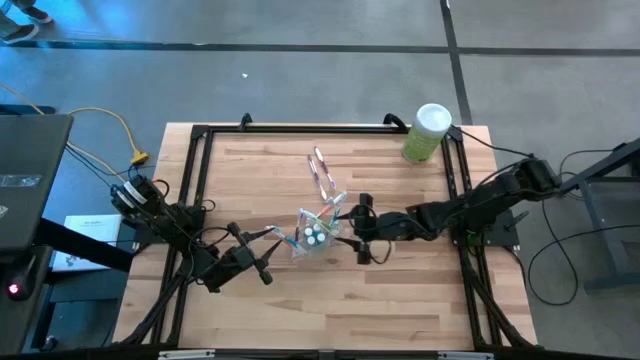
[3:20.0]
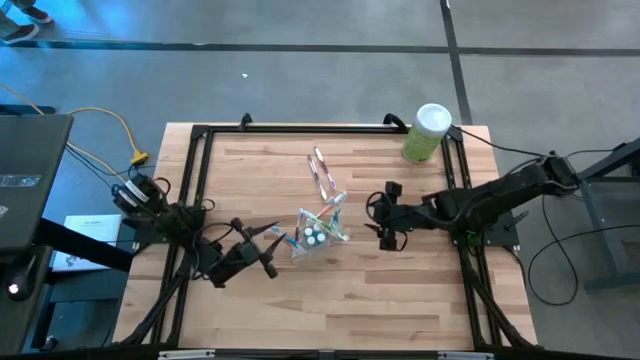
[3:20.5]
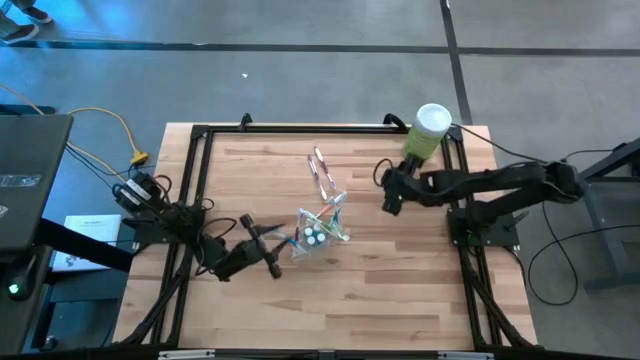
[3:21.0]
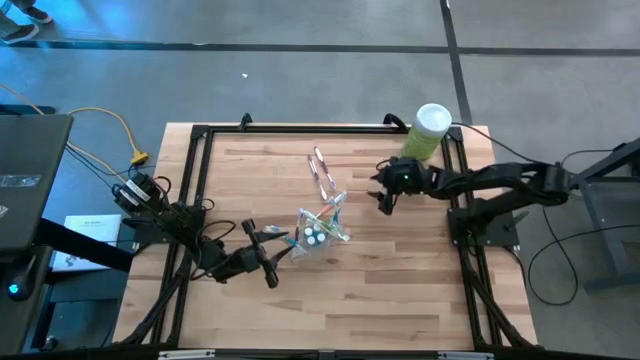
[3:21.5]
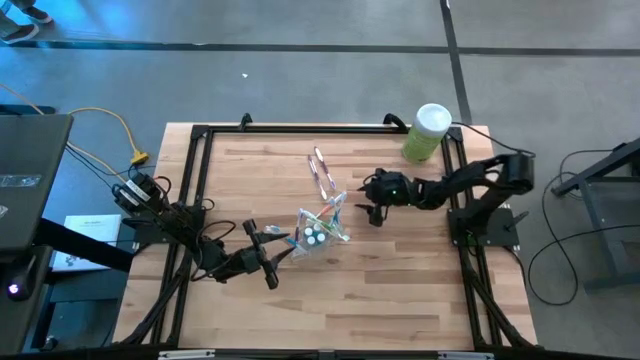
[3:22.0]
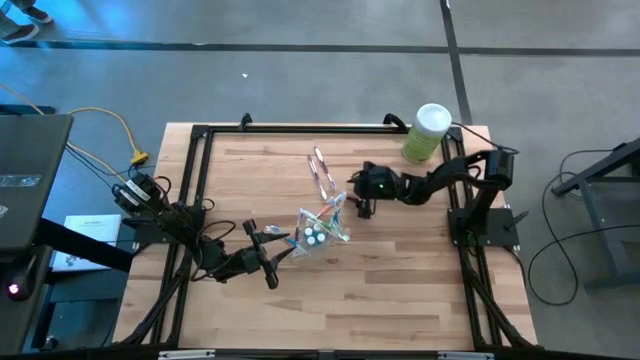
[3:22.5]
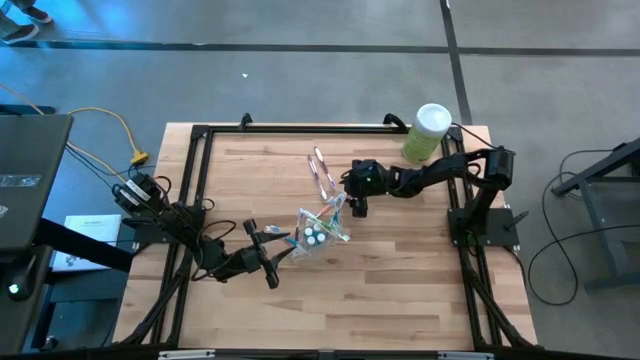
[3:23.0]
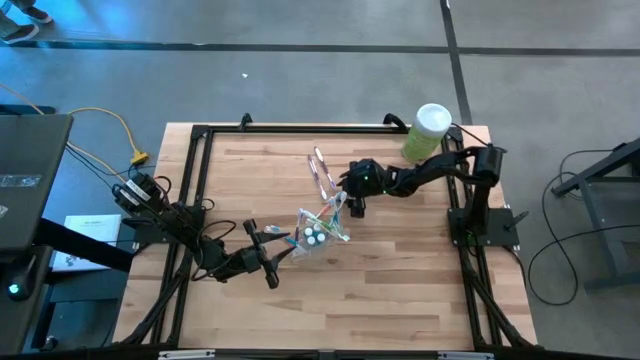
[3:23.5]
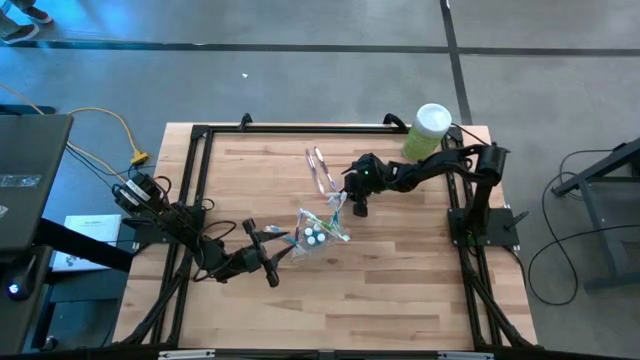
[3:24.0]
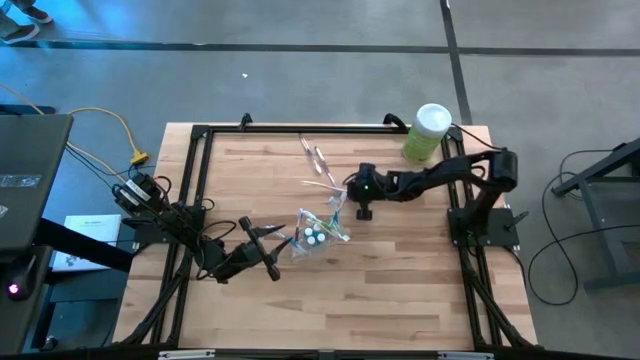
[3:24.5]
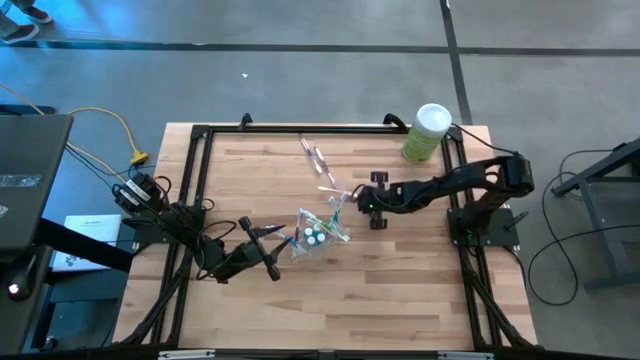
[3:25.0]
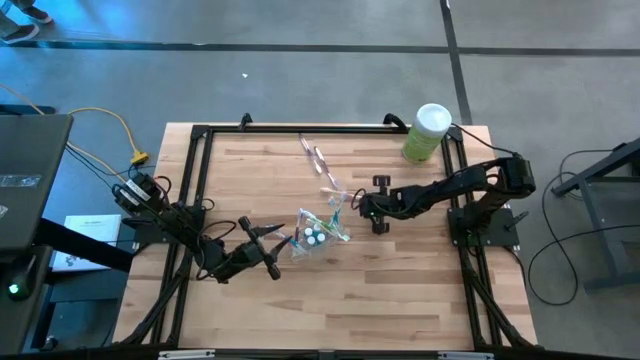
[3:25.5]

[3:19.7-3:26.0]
Task: Pick & Place toothbrushing station
Put the orange toothbrush into the transparent organizer

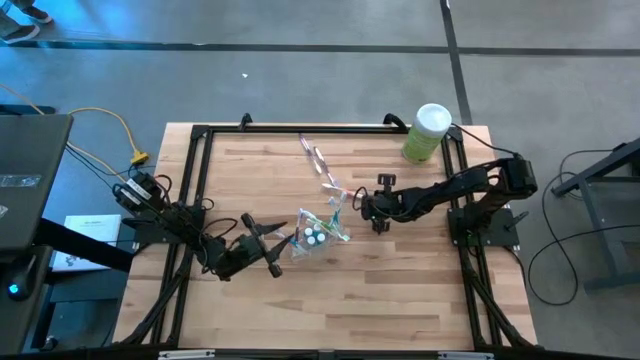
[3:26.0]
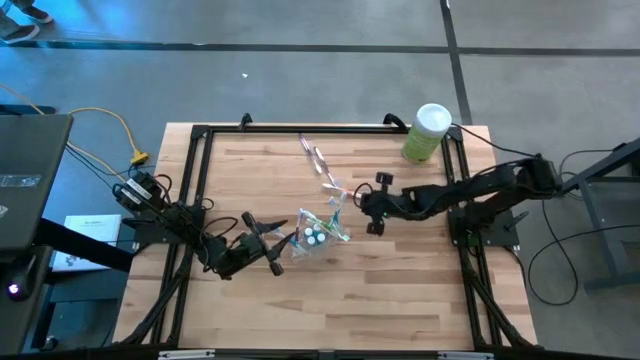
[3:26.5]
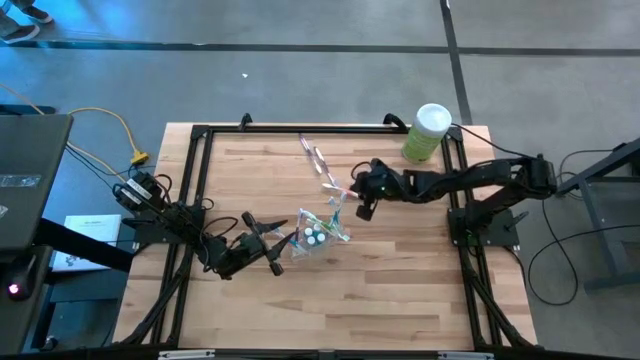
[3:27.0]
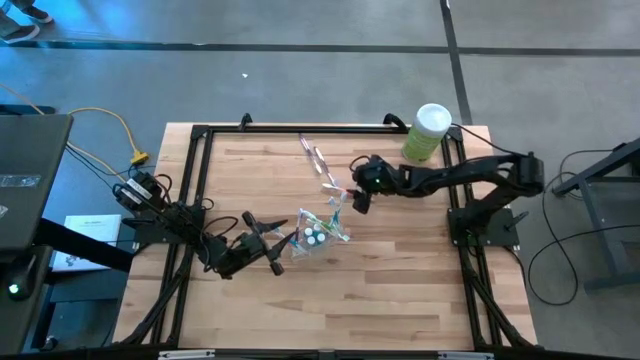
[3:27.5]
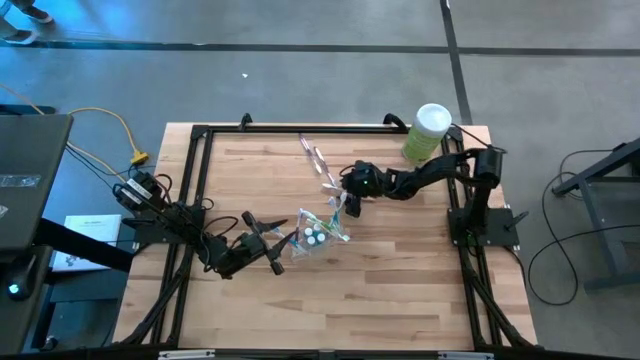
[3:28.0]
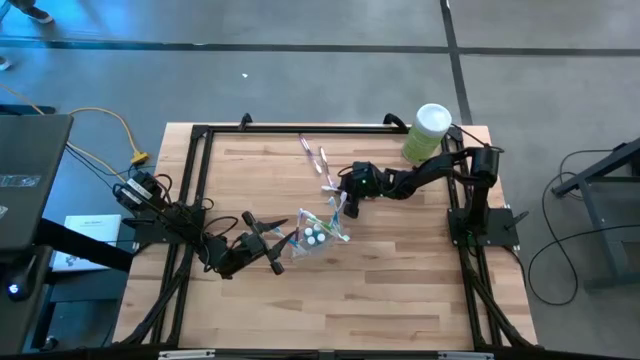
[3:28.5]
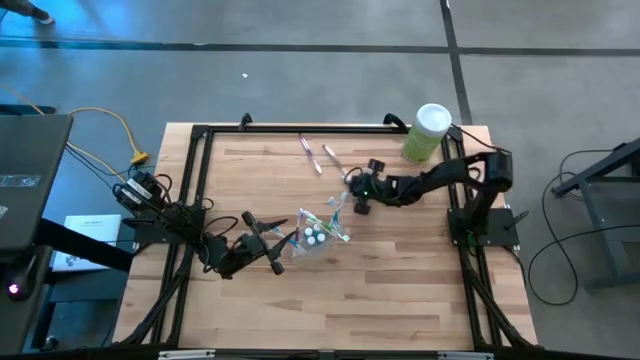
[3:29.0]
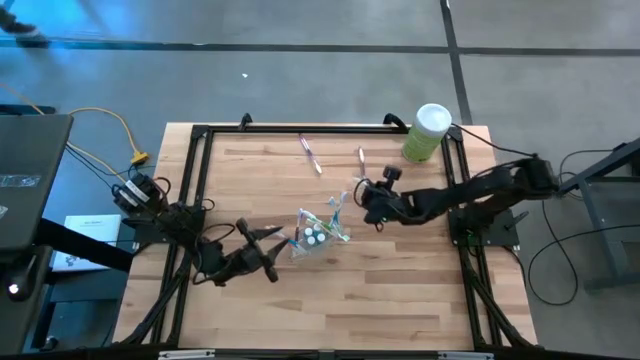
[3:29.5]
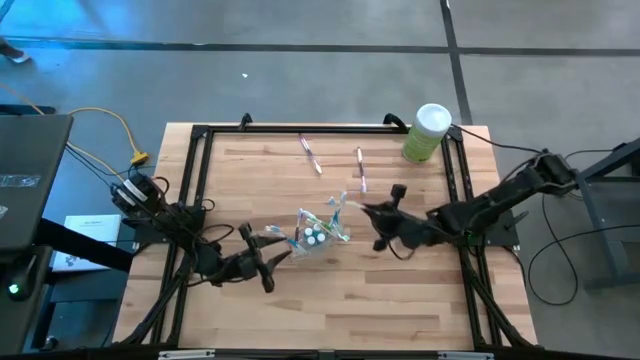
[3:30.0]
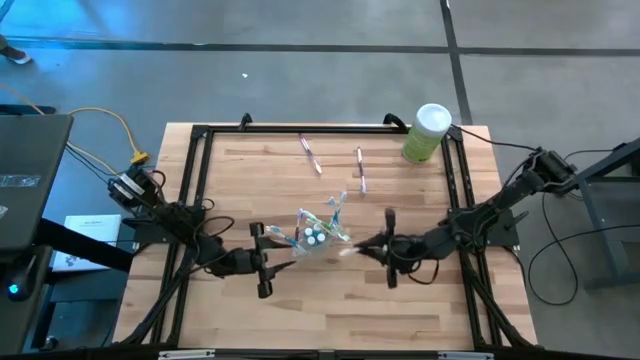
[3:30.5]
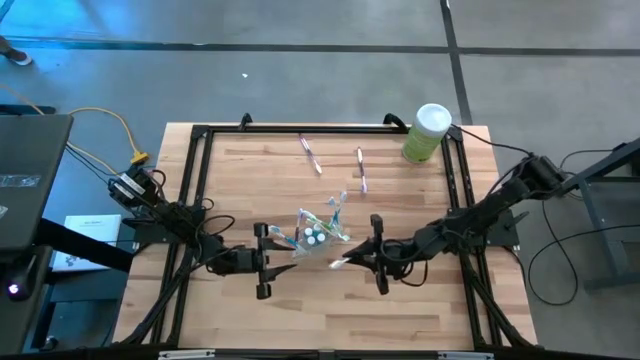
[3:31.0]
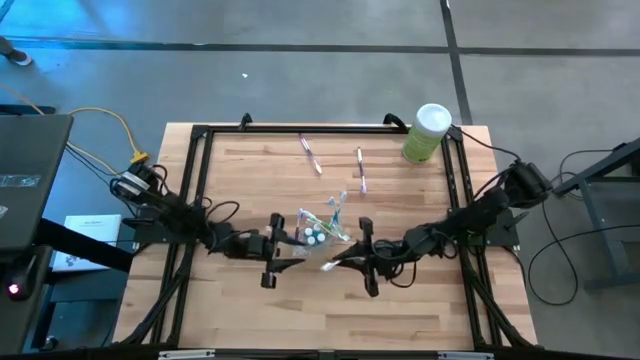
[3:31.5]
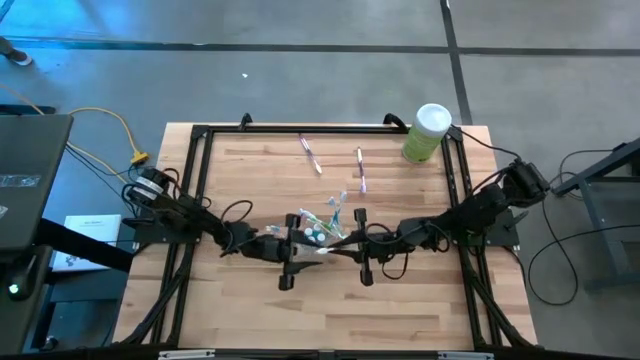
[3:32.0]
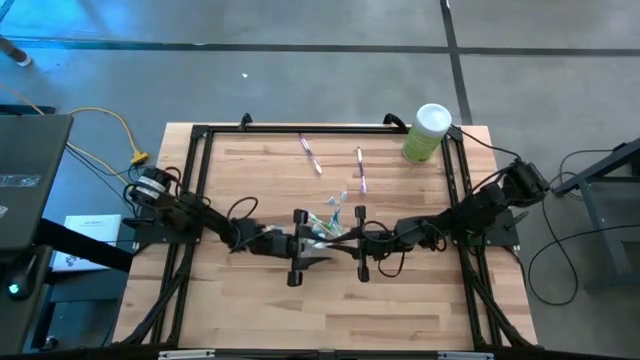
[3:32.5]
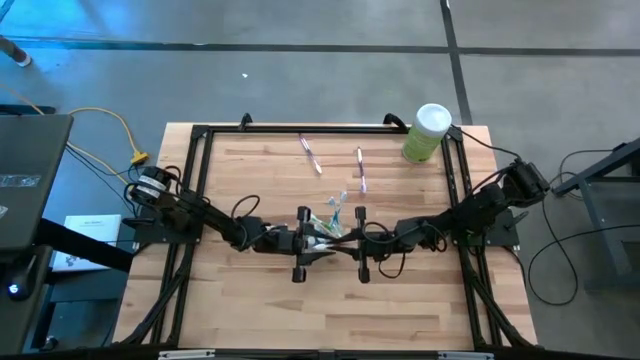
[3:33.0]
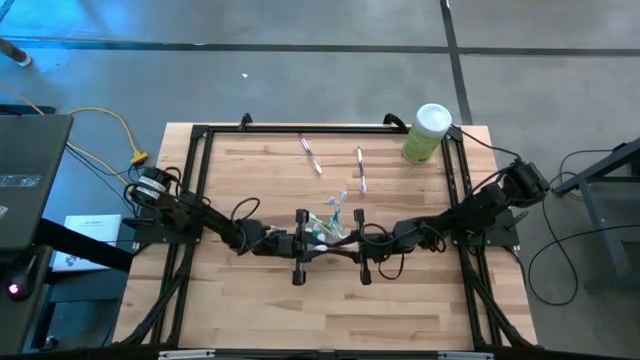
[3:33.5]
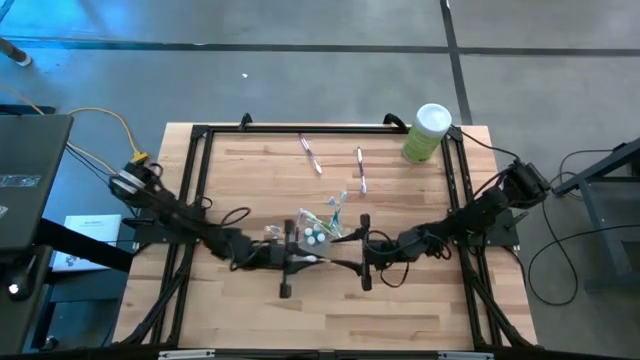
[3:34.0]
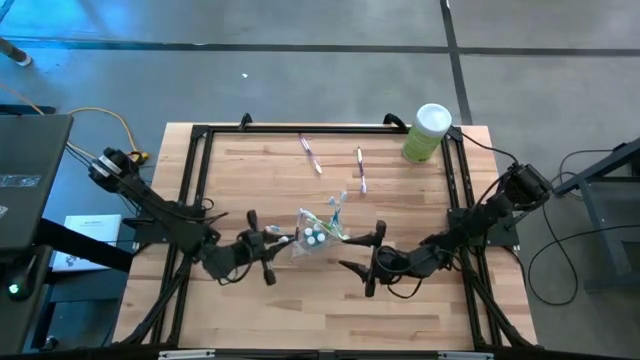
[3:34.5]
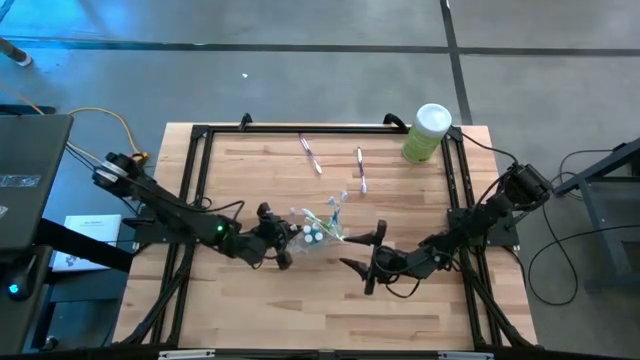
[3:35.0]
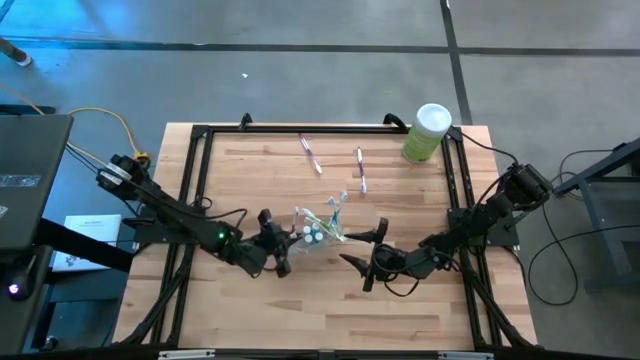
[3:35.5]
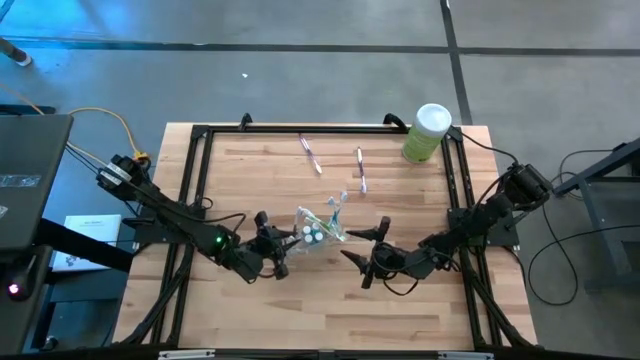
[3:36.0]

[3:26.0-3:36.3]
Put the orange toothbrush into the transparent organizer

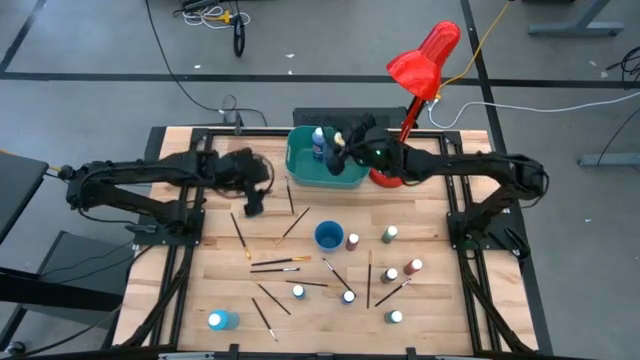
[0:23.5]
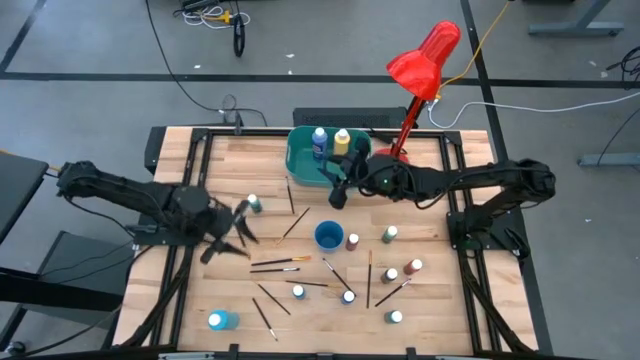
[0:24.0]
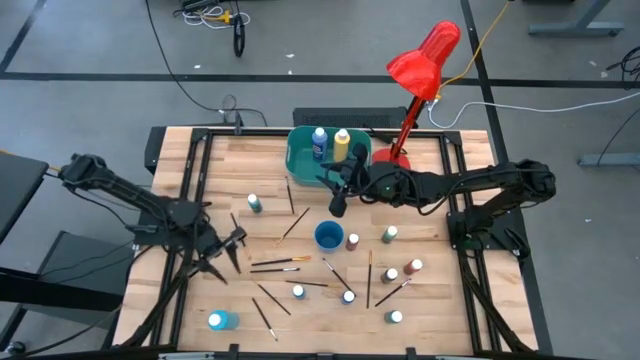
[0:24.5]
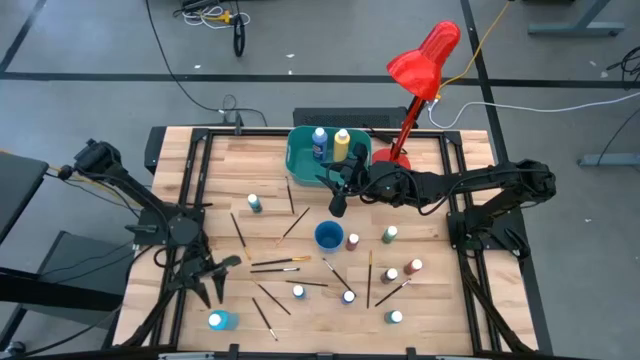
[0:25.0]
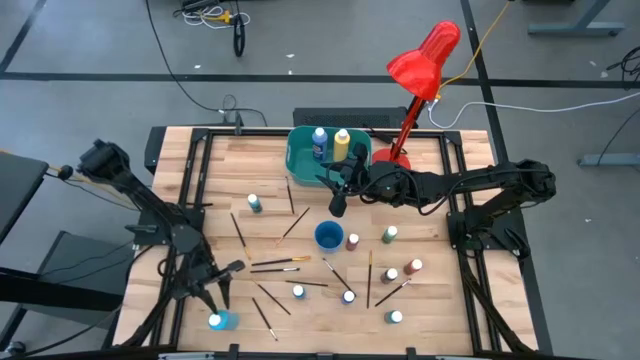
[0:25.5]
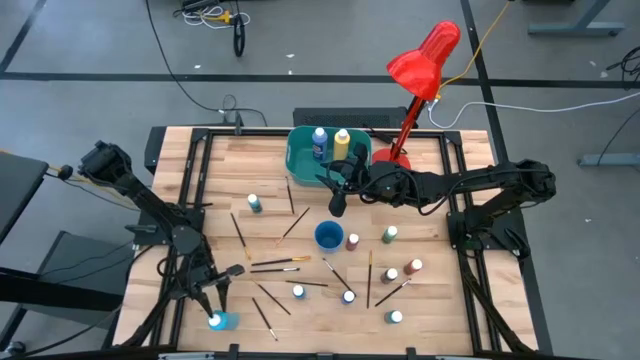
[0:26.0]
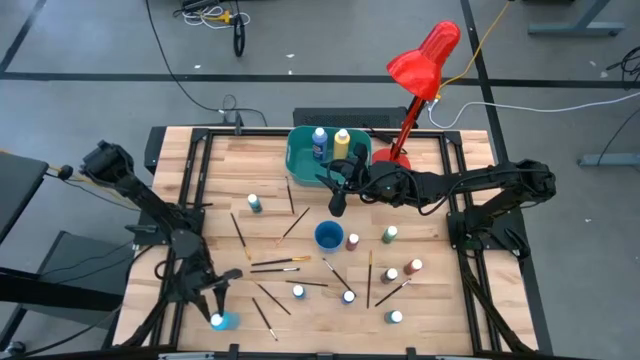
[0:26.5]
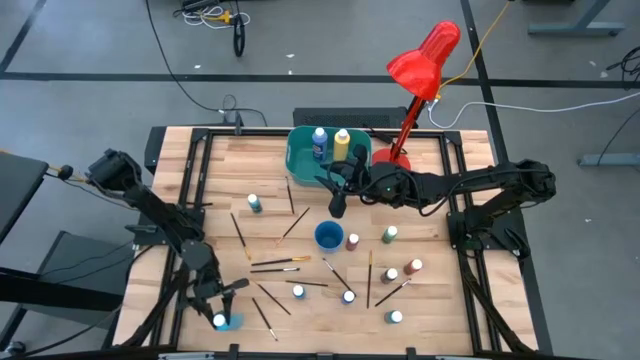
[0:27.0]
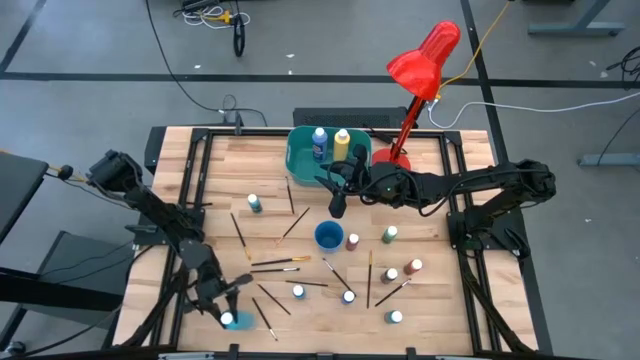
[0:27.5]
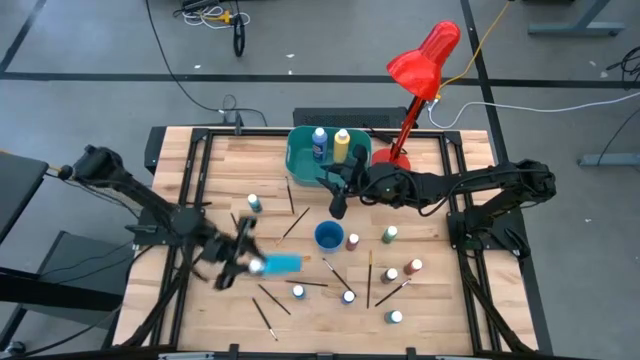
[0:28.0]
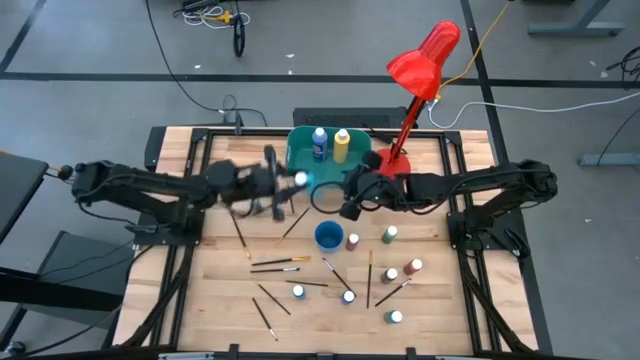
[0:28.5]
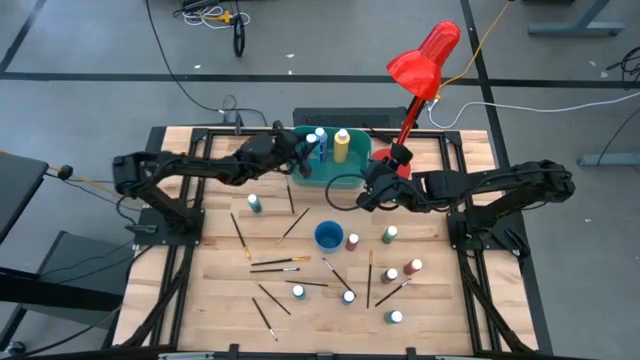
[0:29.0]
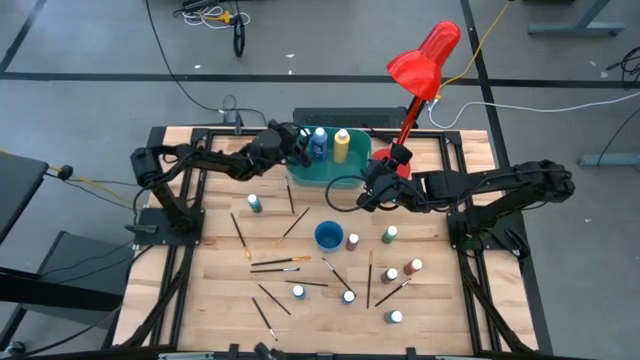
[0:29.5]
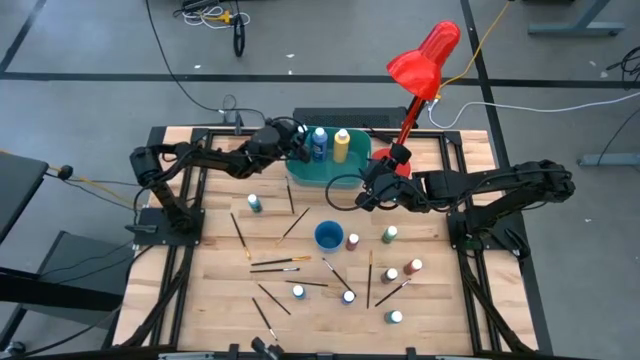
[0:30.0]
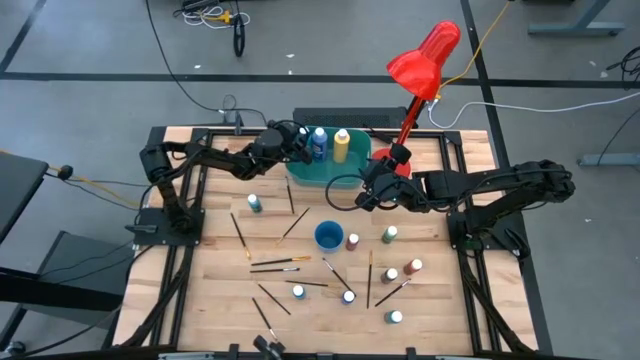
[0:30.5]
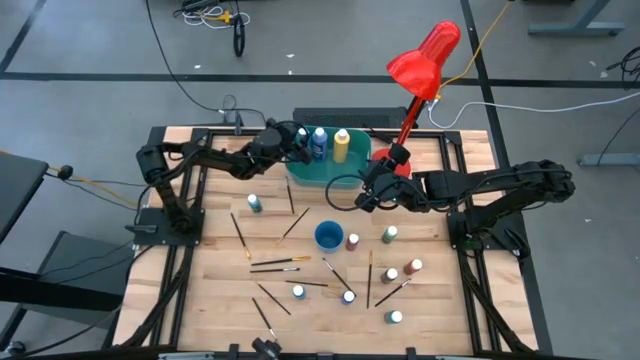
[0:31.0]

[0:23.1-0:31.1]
Task: Pick & Place Paint Supplies
Put the light blue paint bottle into the green bin
